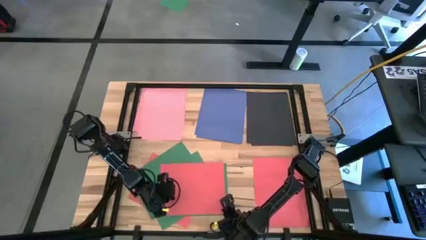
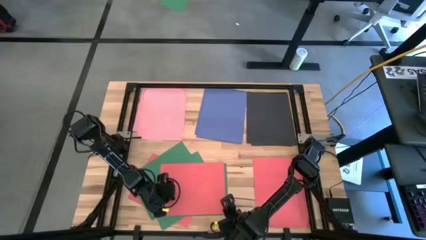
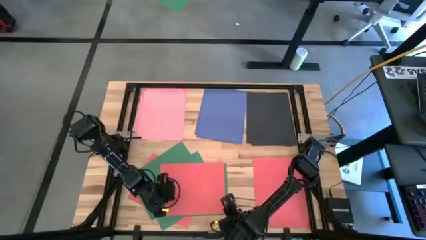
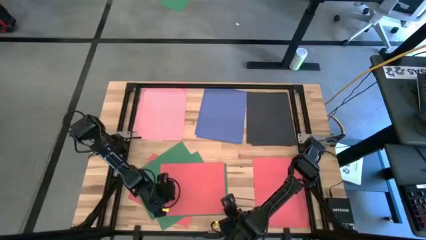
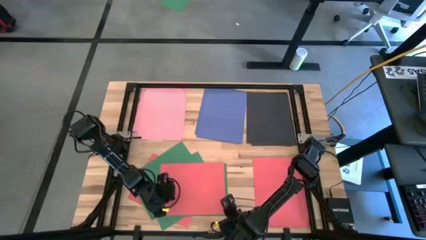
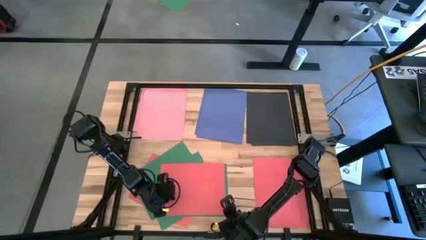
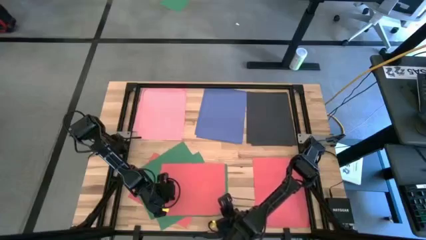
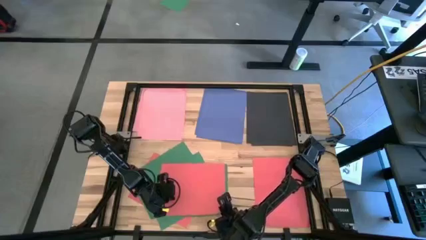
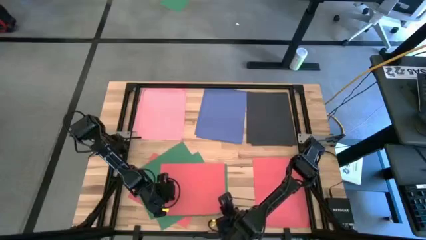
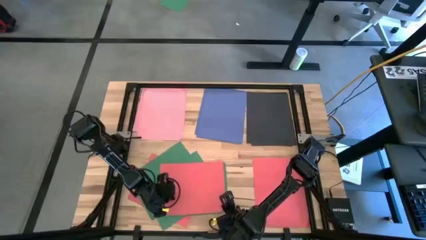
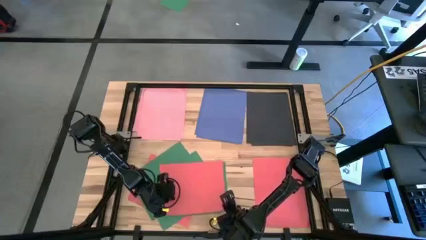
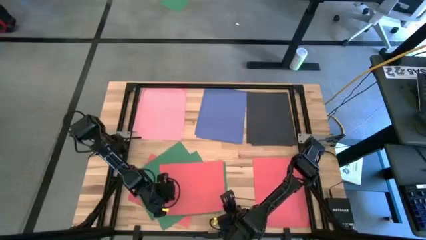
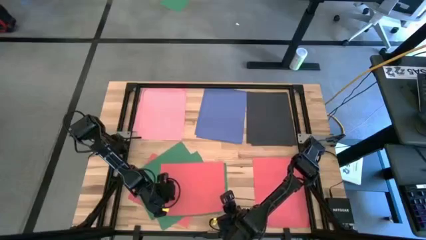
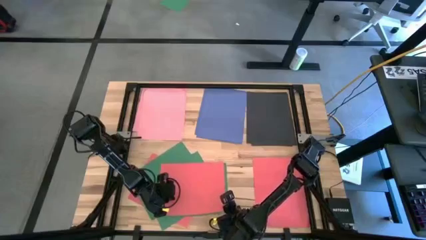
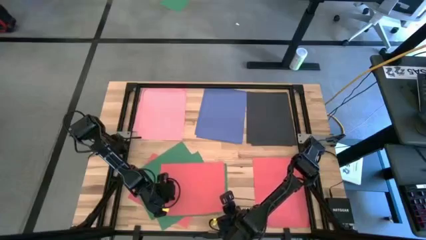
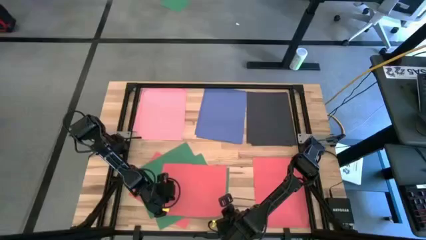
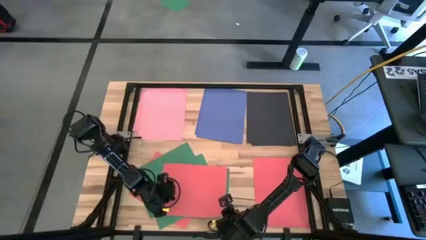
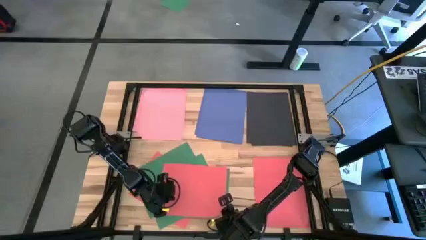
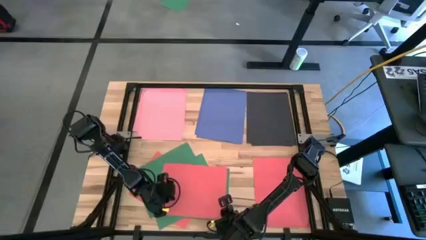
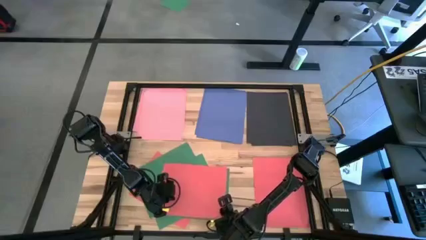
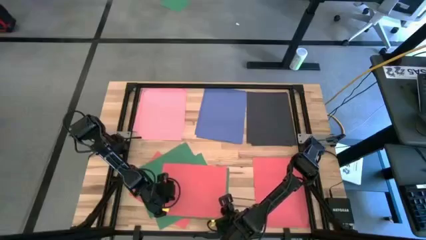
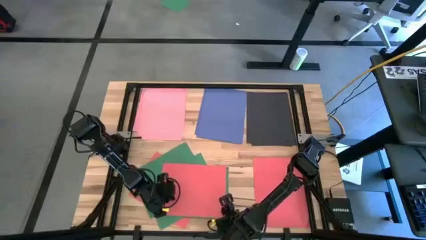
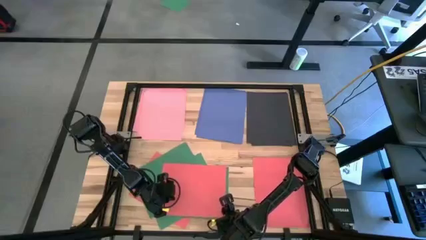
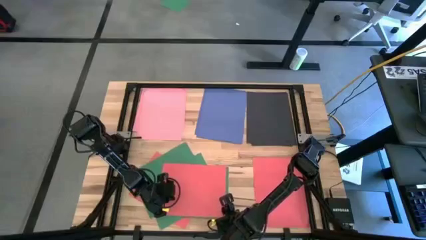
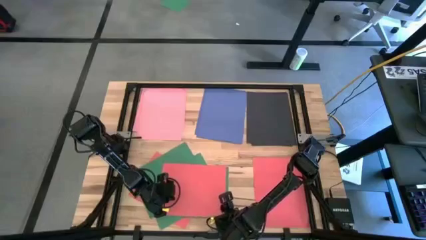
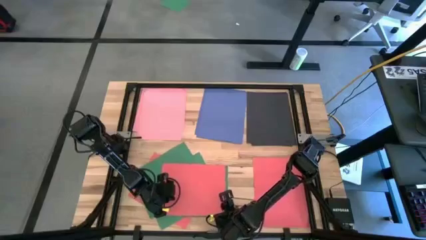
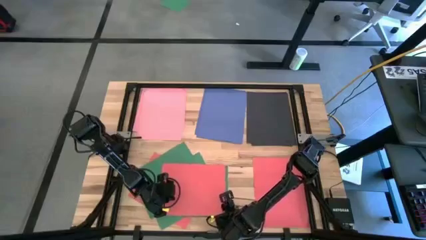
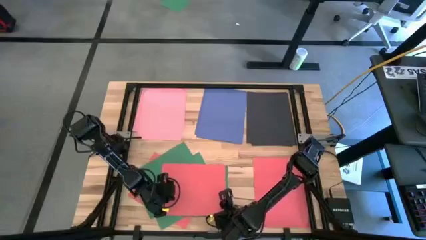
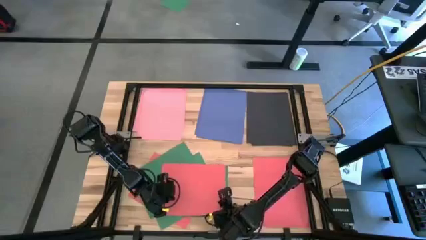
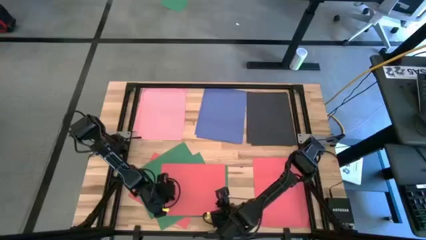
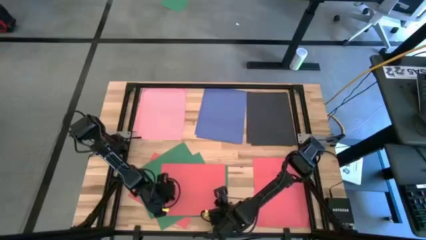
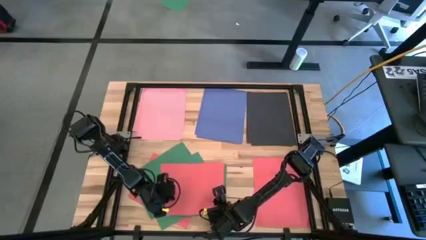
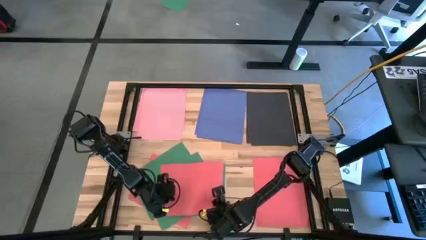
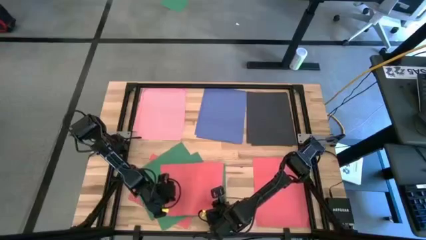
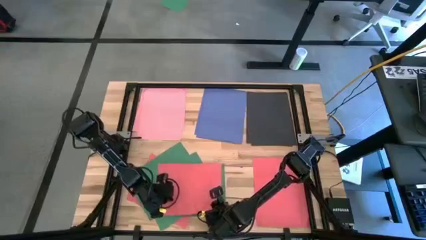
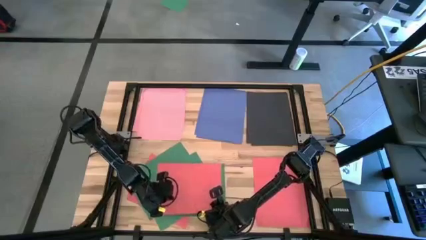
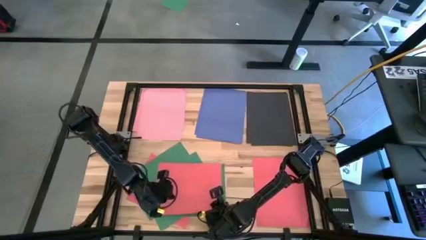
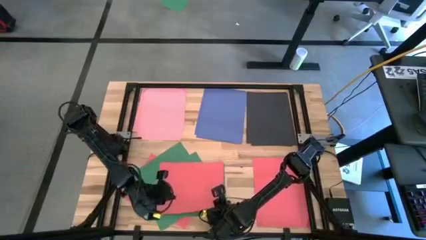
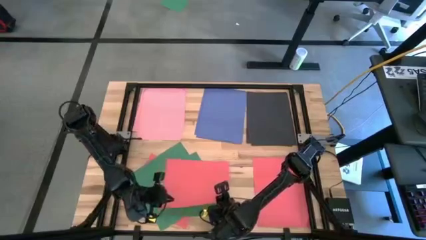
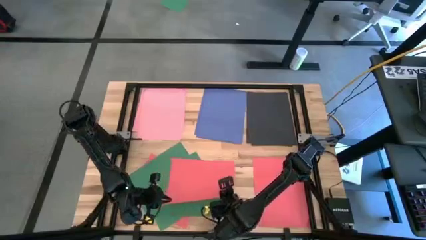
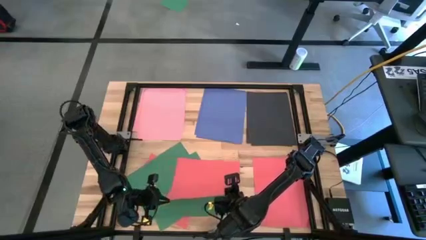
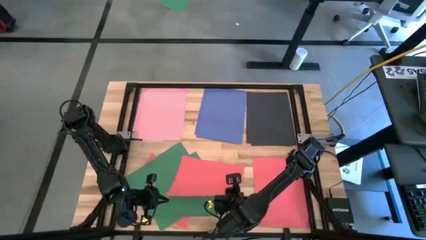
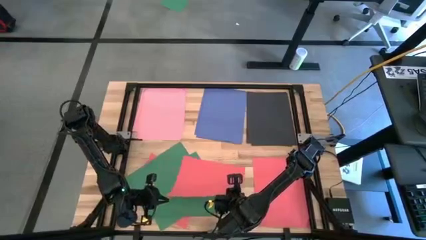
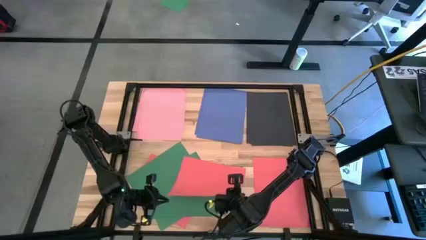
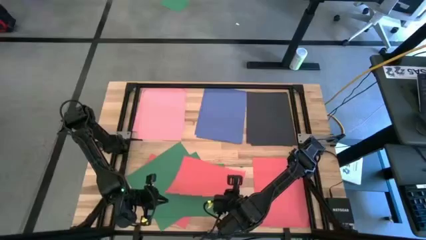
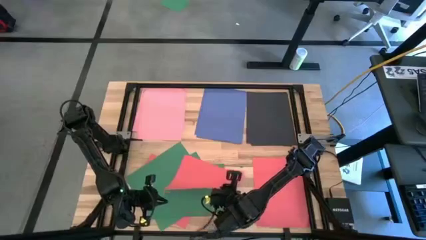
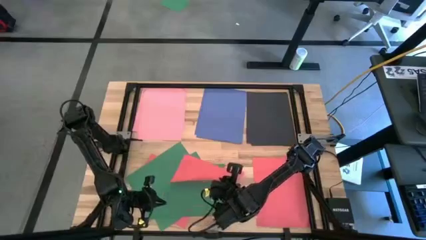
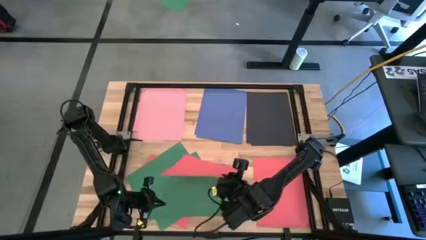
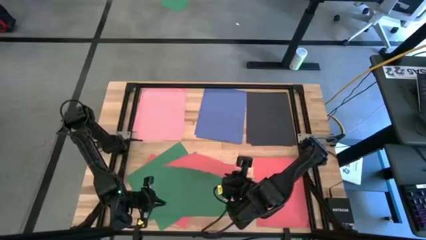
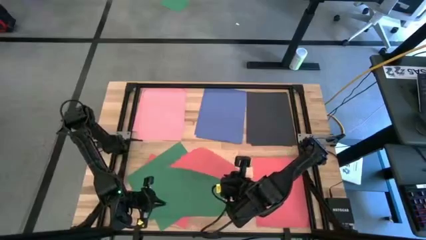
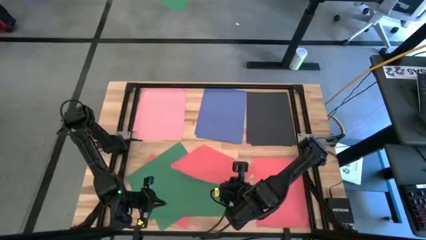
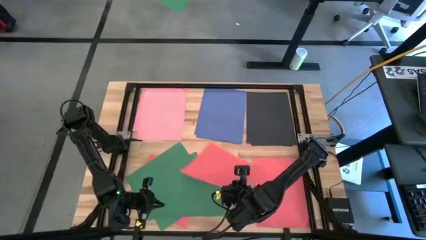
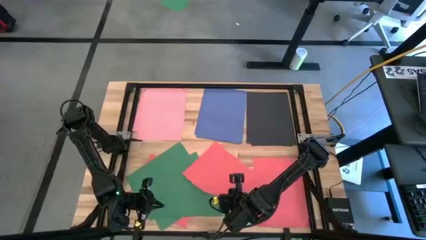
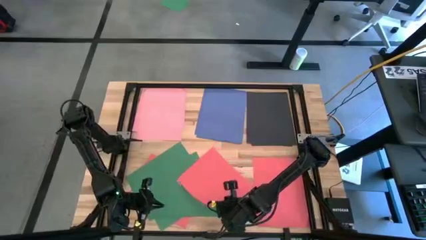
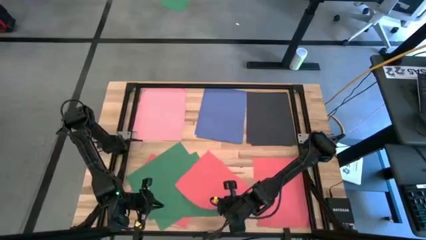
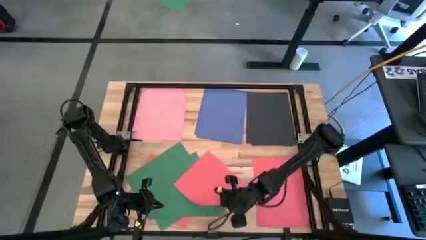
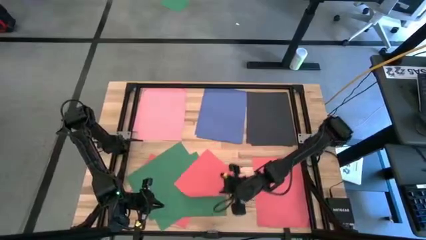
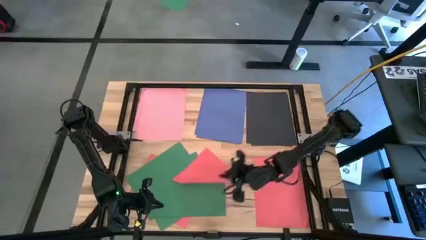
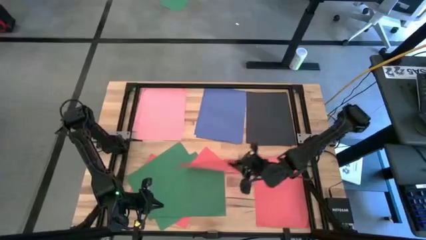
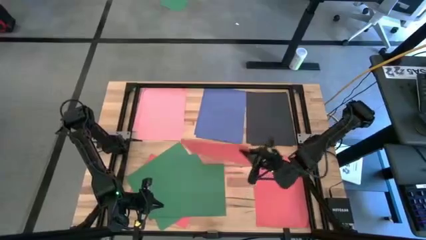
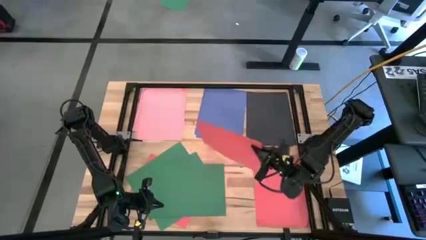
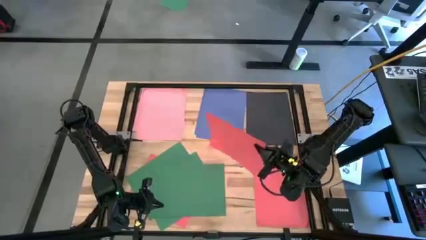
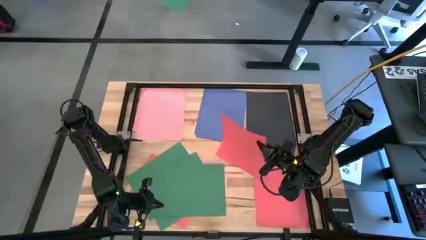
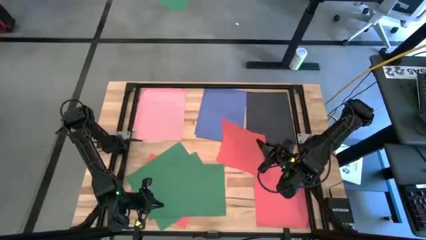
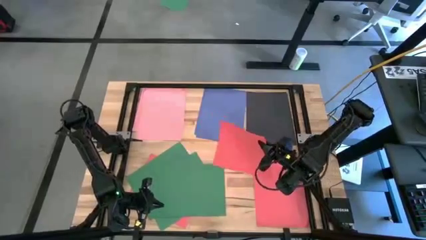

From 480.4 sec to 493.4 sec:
Task: Organize paper
Stack the red paper on top of the other red paper on the table

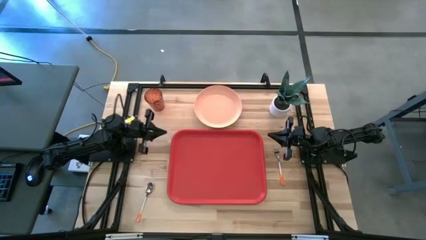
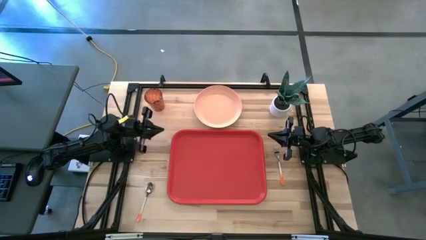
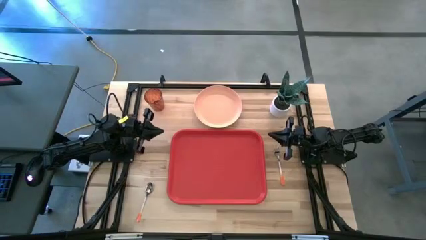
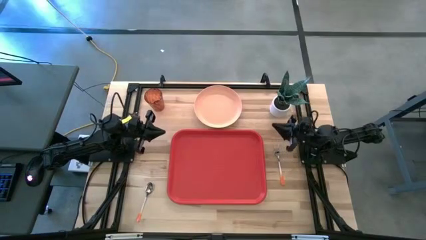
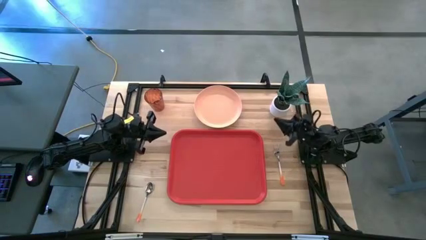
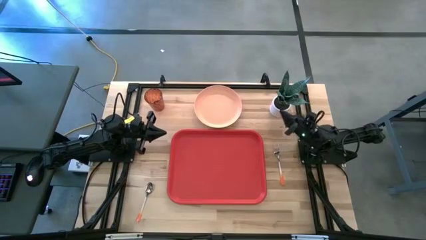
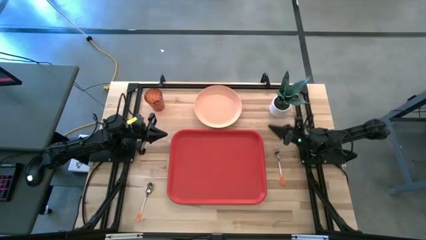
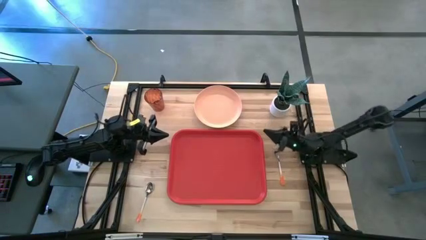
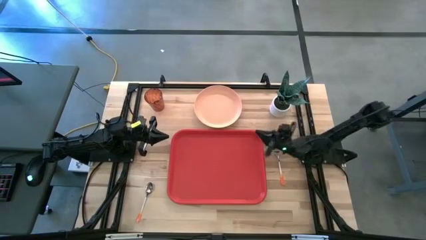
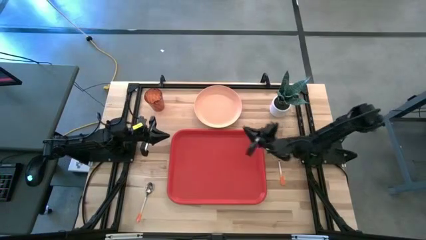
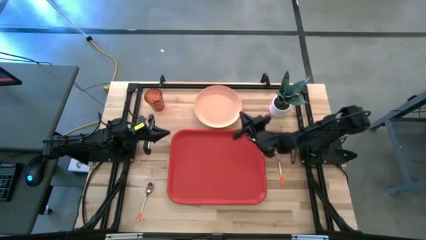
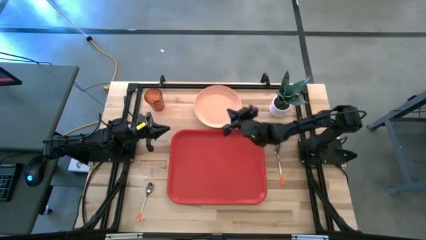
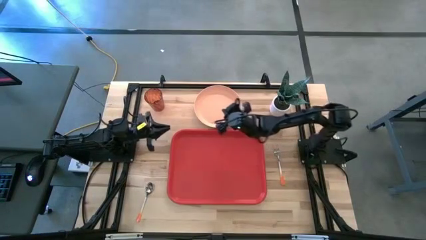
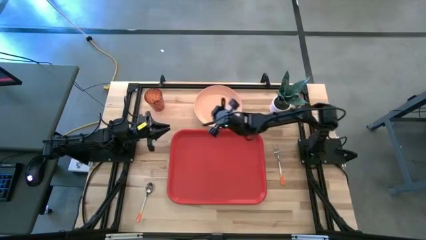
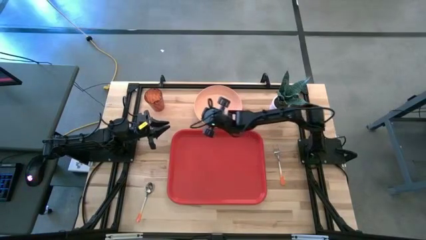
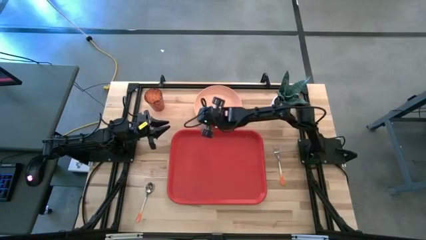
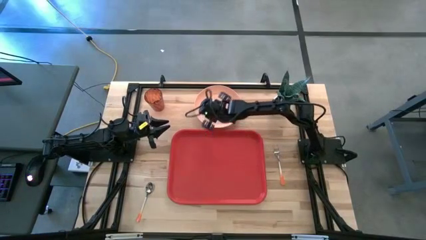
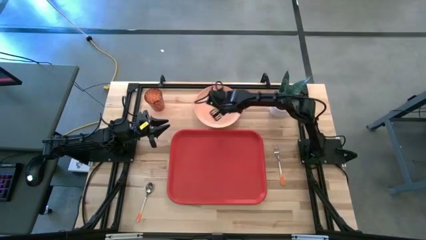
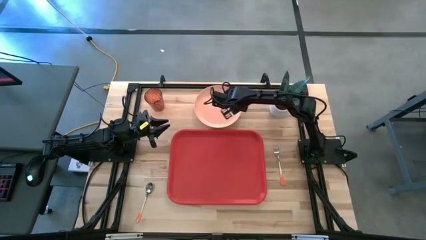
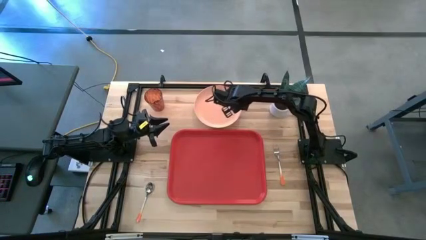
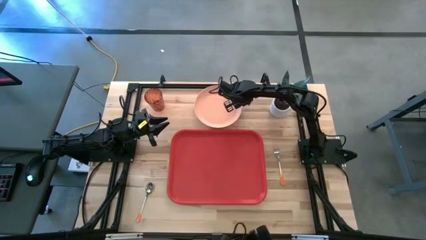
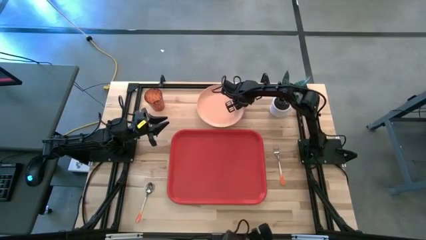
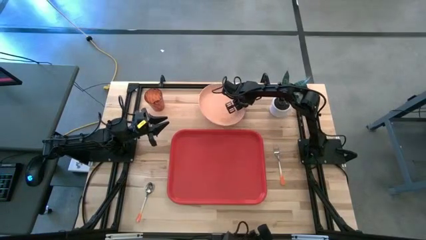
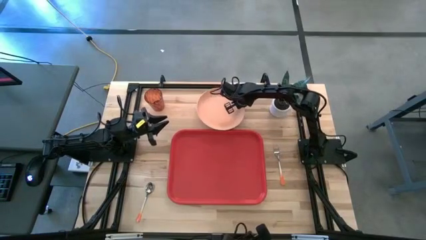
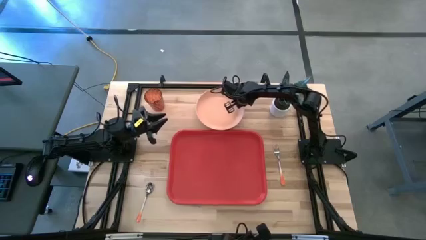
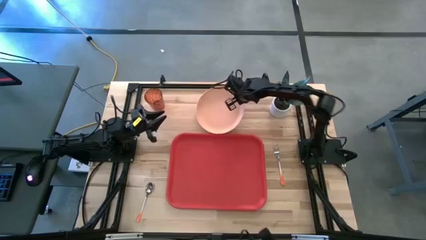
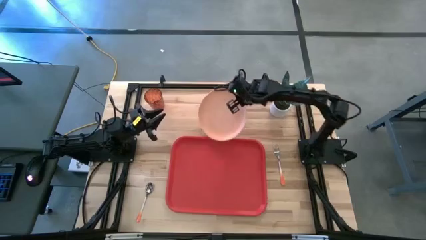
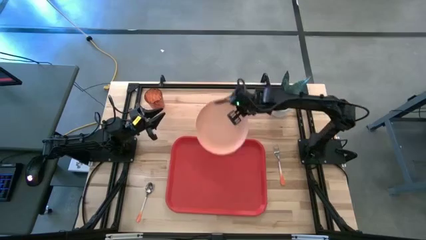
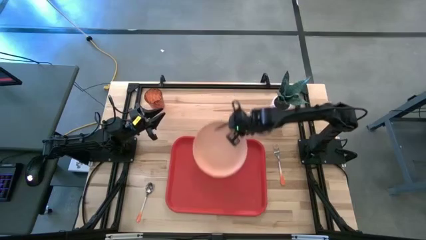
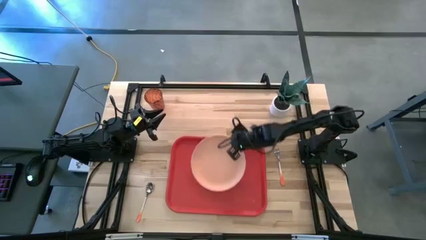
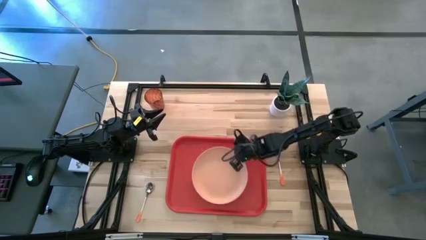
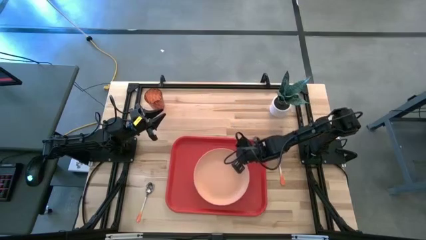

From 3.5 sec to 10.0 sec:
Task: Pick and place plate/cup/fork/spoon on tray
Put the orange plate on the red serving tray
